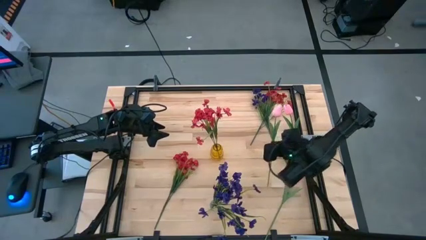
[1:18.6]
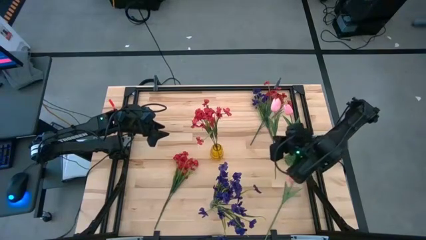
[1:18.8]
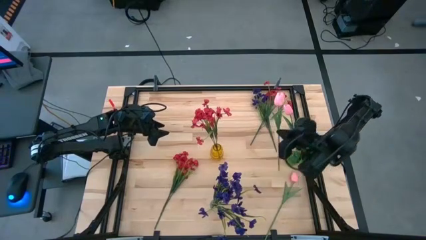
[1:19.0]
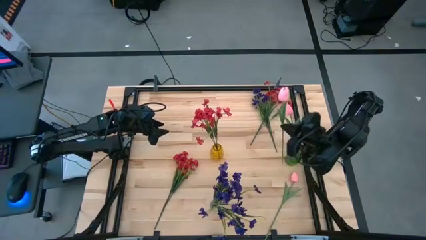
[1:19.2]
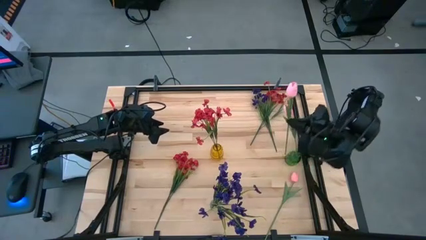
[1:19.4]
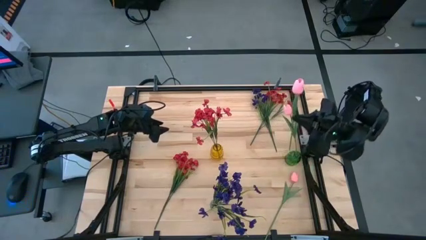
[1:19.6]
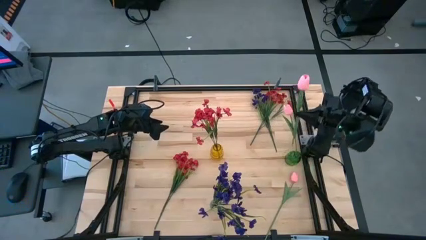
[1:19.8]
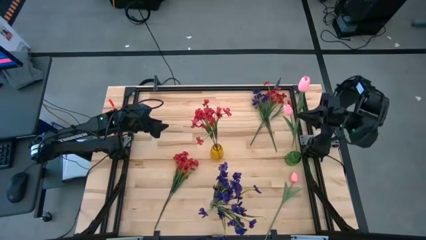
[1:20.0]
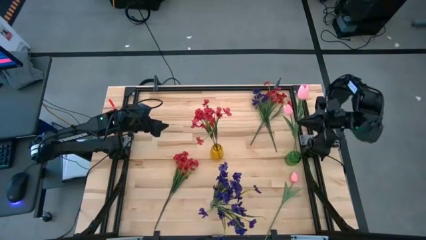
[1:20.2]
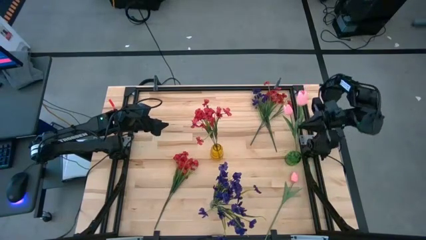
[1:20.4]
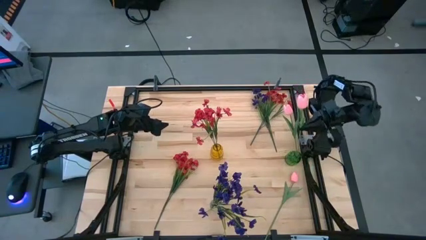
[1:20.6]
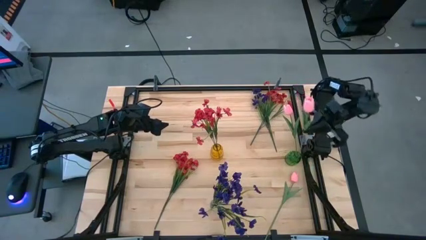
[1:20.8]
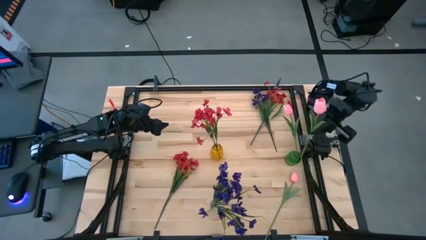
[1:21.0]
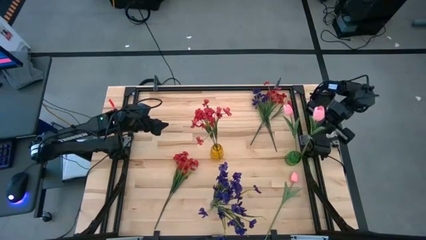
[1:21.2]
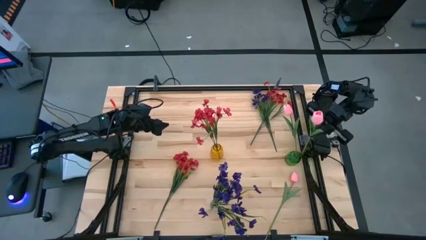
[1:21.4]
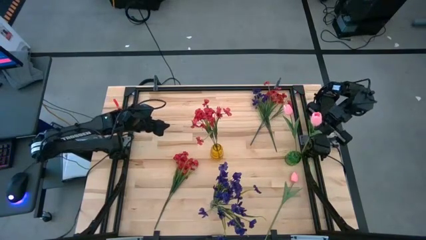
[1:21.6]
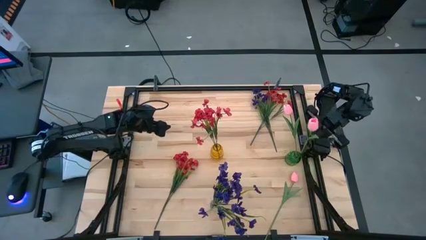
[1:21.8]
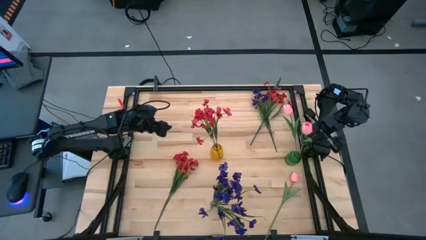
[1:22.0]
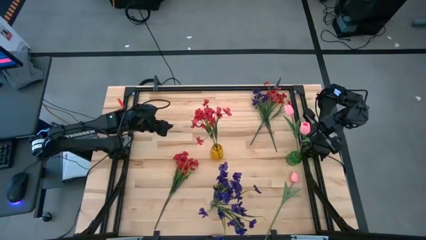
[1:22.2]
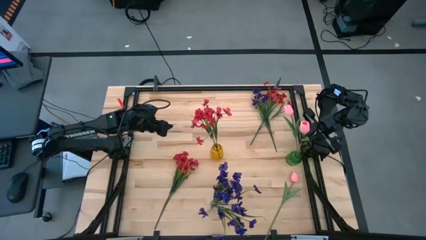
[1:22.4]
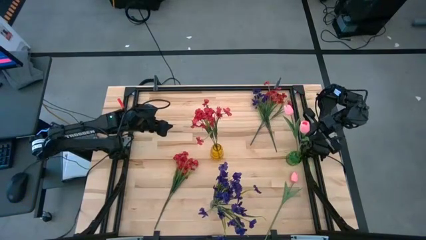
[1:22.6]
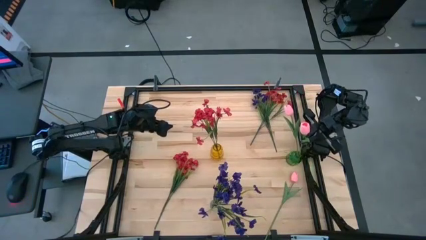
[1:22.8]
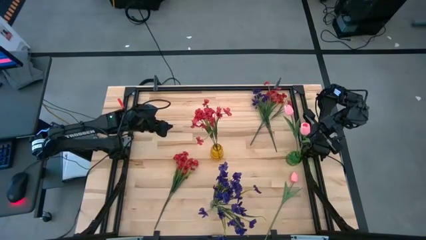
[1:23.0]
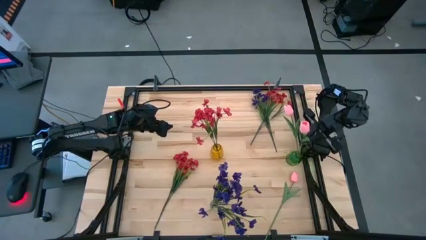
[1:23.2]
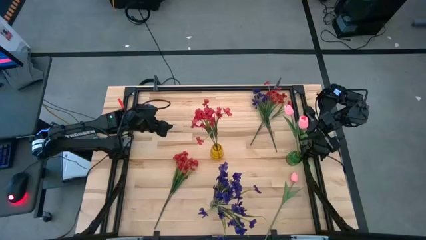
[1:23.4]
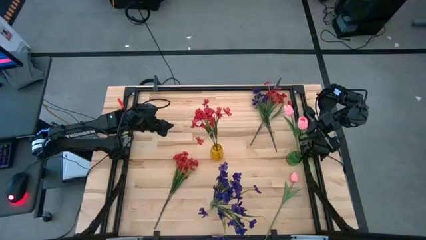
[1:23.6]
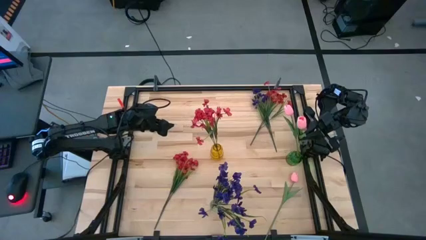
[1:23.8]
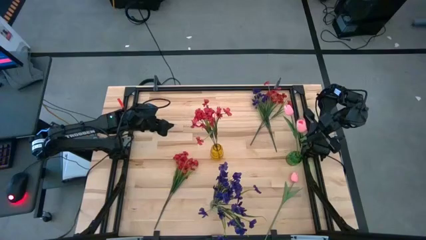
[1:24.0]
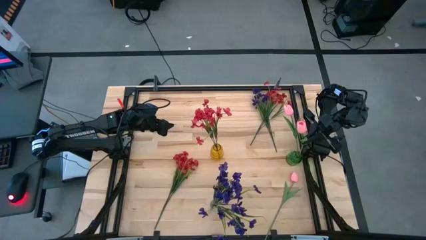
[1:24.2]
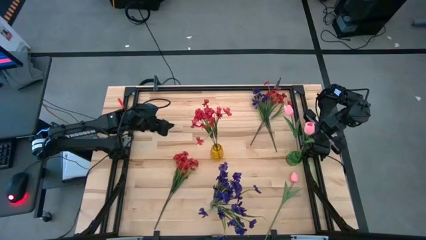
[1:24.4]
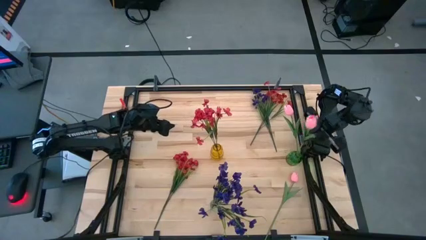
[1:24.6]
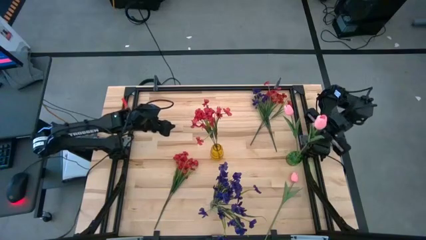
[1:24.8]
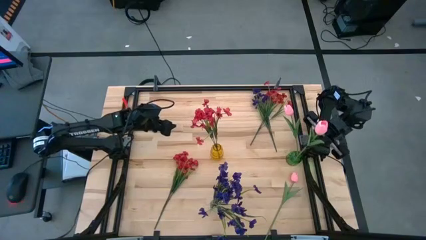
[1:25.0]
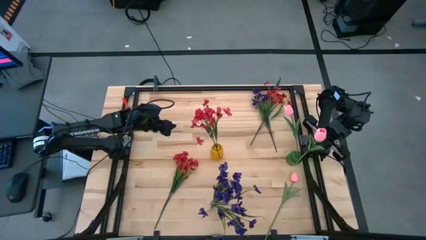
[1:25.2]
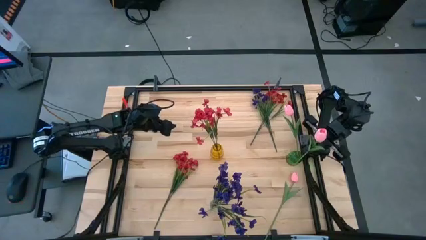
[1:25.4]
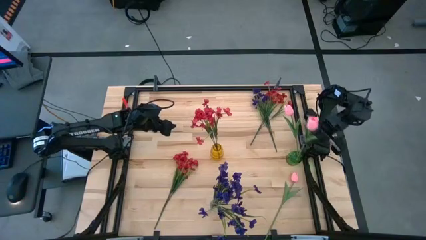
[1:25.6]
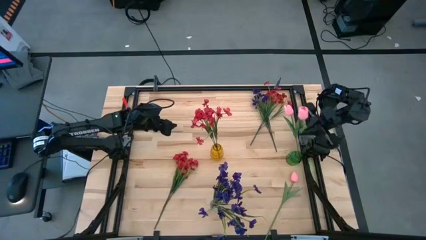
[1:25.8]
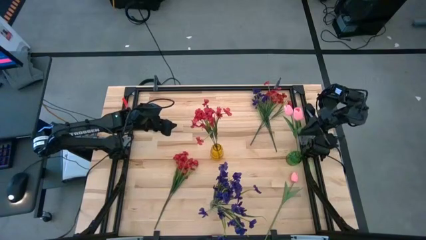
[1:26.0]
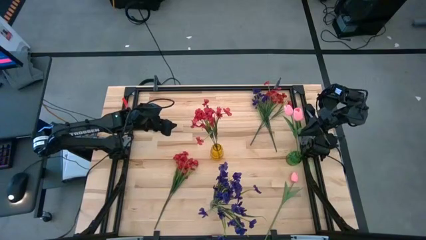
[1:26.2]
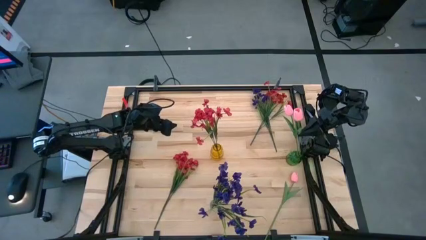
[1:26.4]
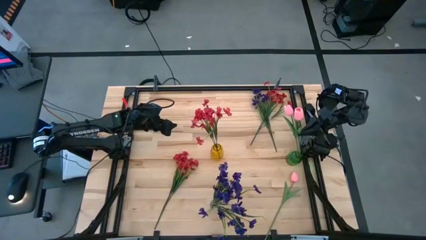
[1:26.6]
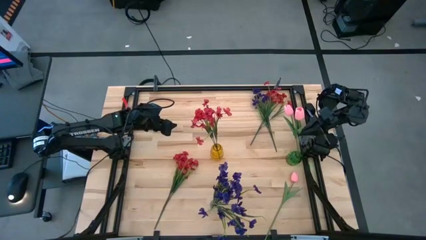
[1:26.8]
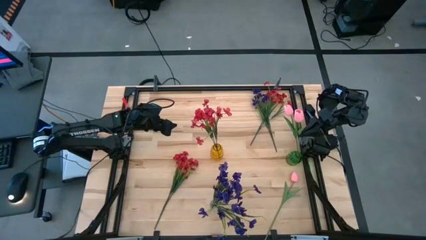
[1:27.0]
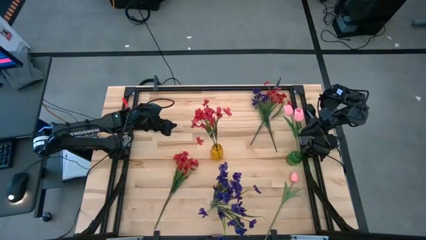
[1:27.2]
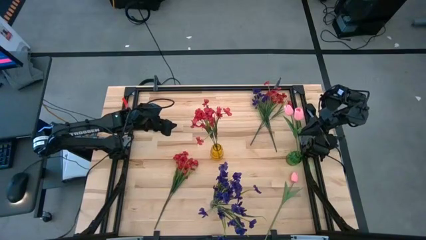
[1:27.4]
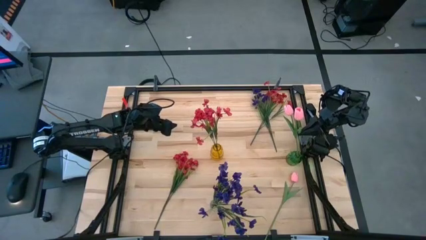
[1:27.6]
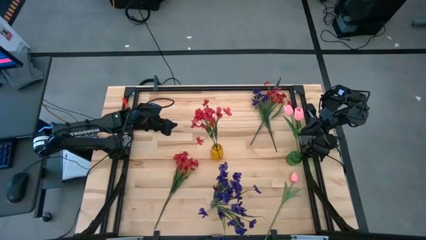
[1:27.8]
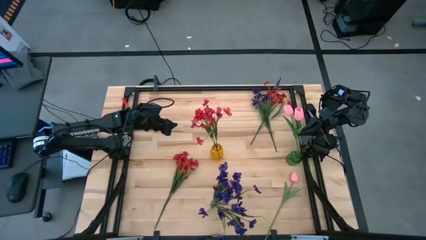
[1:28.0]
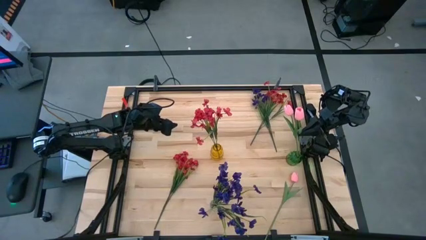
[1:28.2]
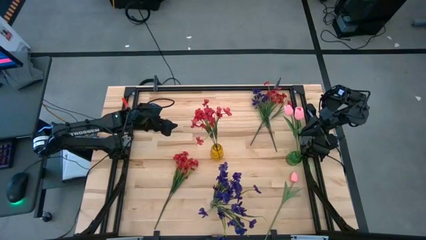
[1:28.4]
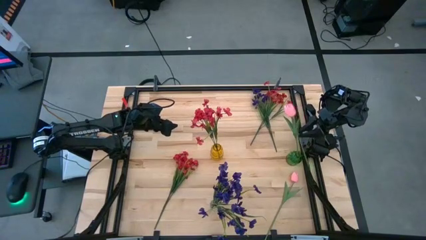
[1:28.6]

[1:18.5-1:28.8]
Task: Sort flowers into vase by color
Put the bottom left pink tulip into the green vase
